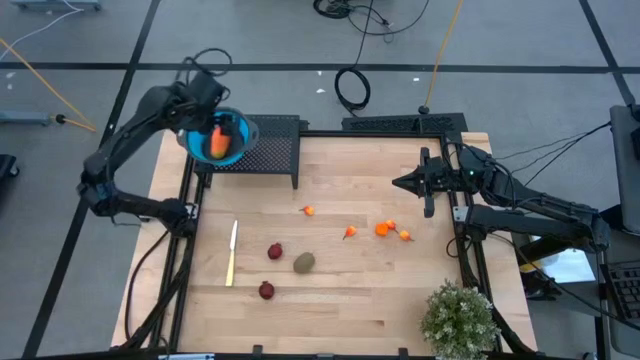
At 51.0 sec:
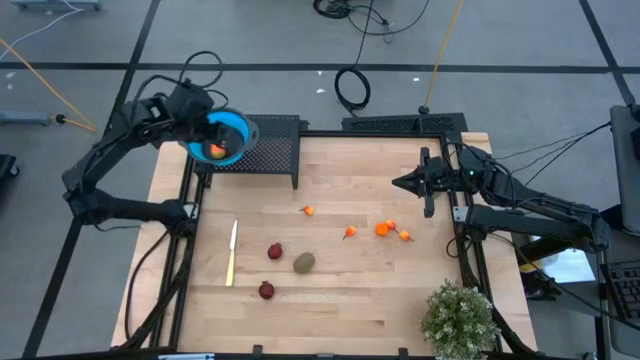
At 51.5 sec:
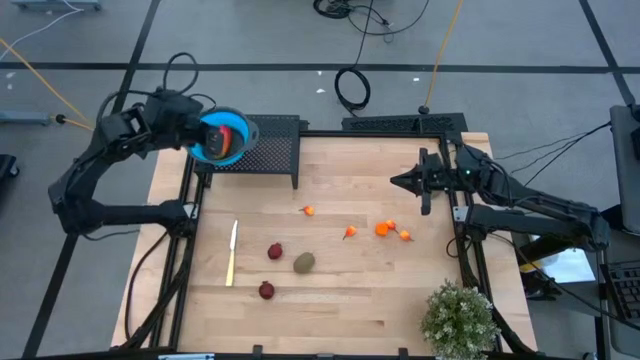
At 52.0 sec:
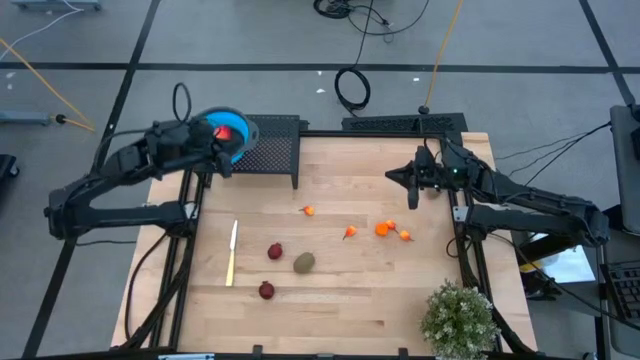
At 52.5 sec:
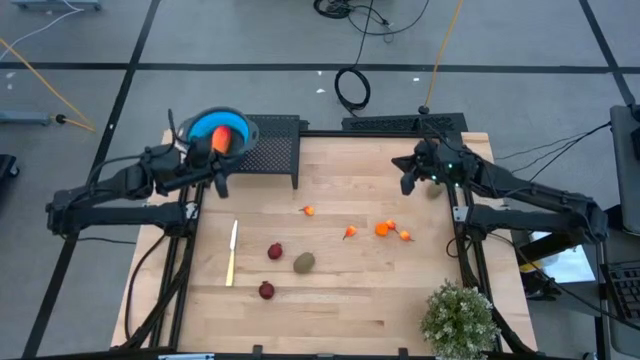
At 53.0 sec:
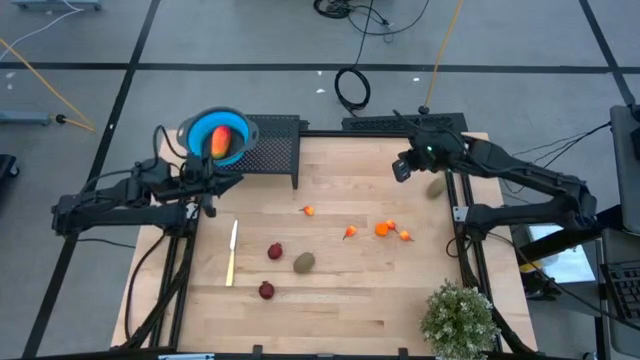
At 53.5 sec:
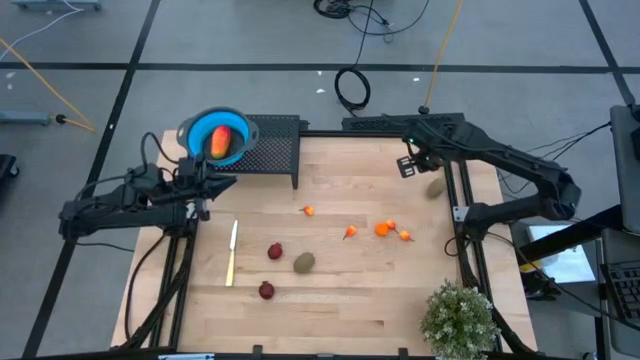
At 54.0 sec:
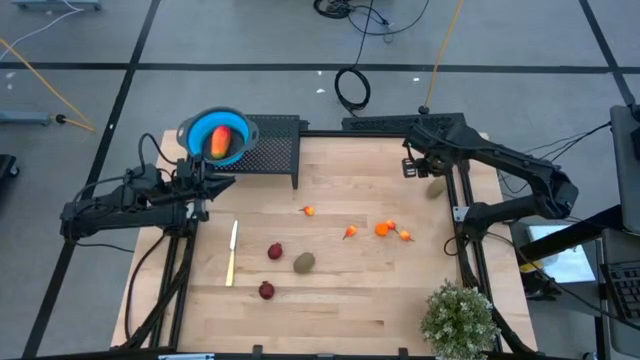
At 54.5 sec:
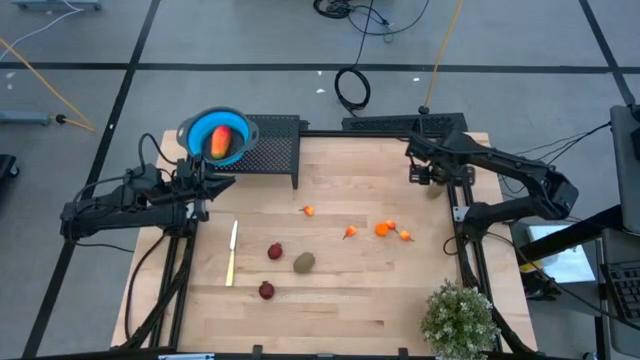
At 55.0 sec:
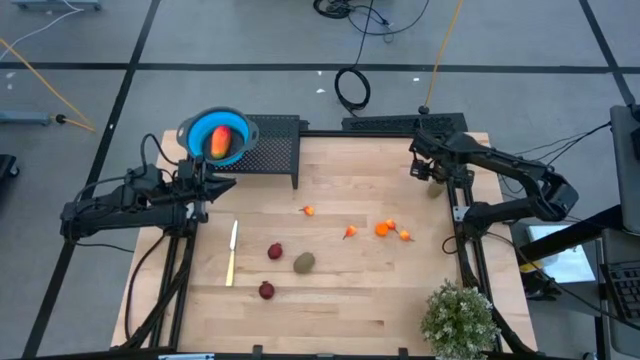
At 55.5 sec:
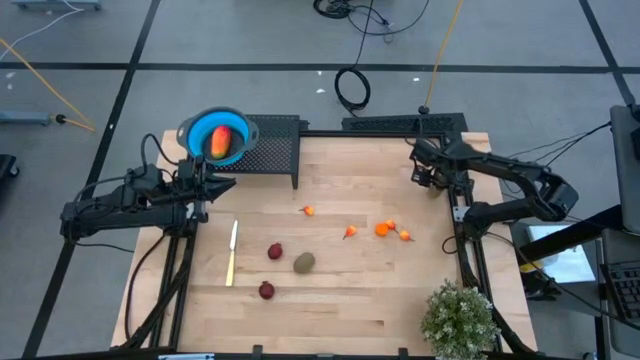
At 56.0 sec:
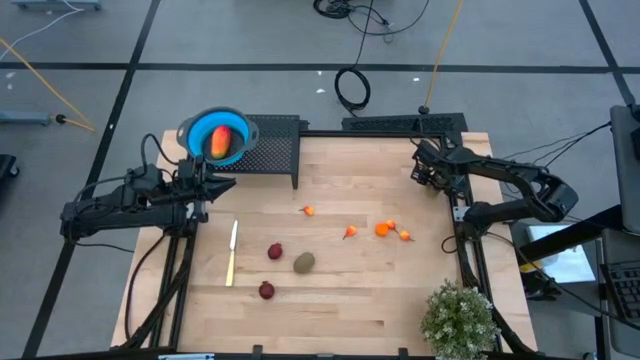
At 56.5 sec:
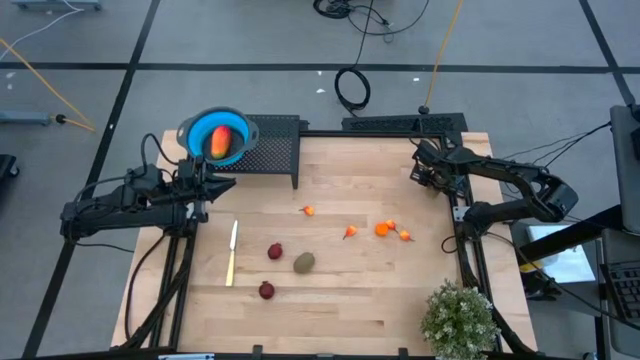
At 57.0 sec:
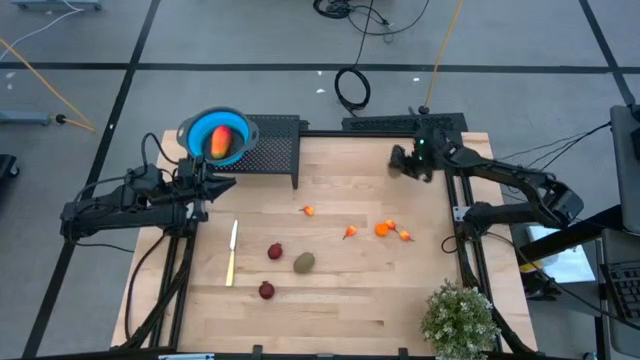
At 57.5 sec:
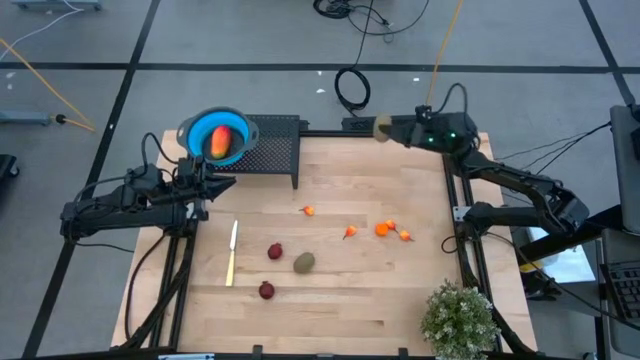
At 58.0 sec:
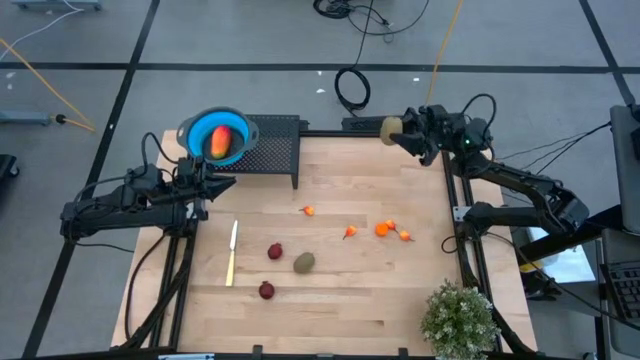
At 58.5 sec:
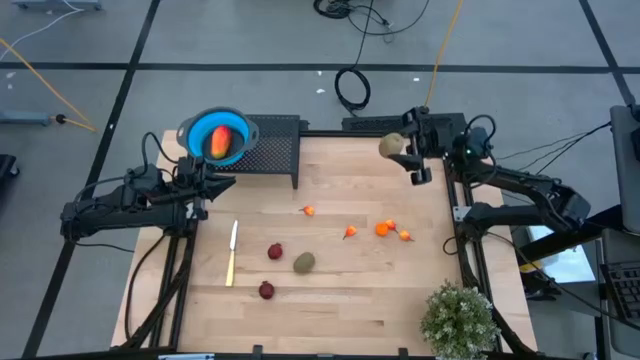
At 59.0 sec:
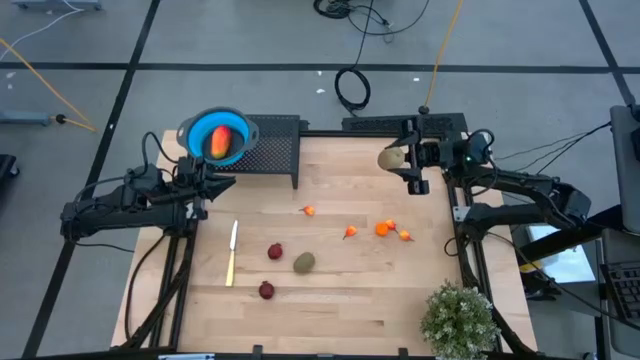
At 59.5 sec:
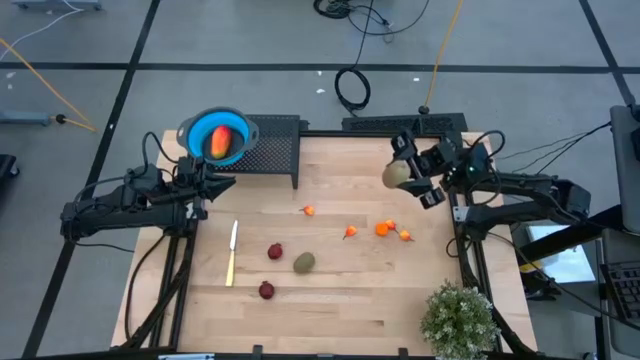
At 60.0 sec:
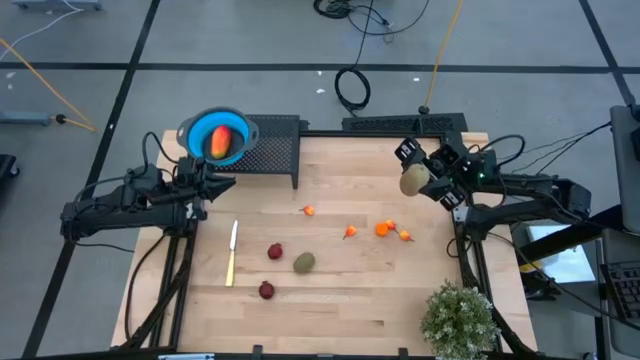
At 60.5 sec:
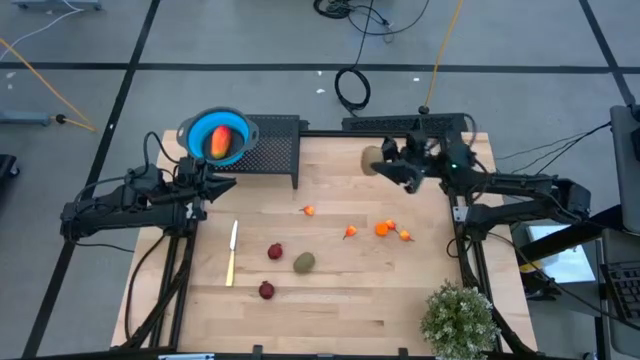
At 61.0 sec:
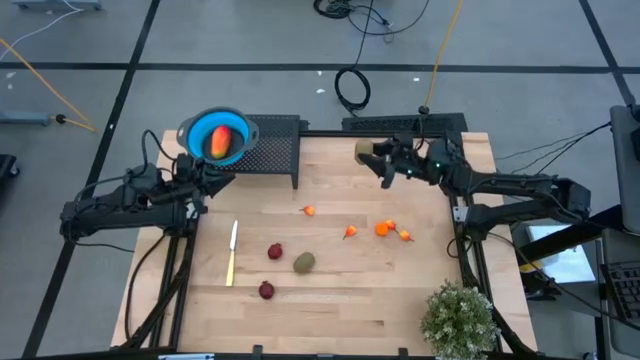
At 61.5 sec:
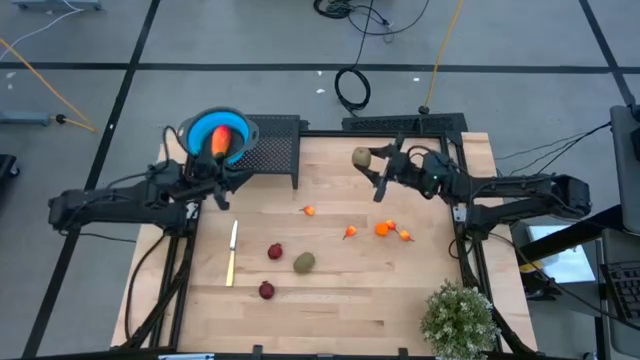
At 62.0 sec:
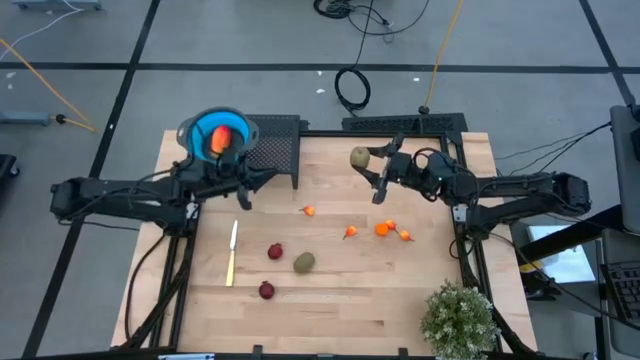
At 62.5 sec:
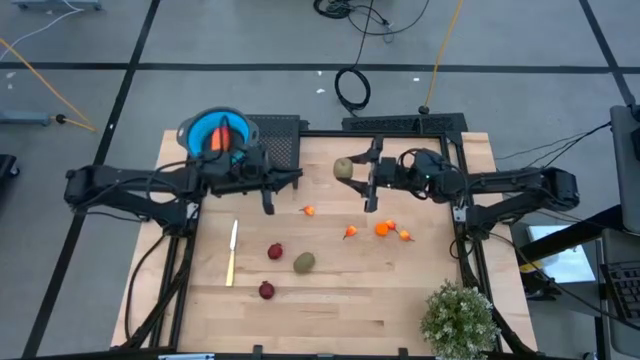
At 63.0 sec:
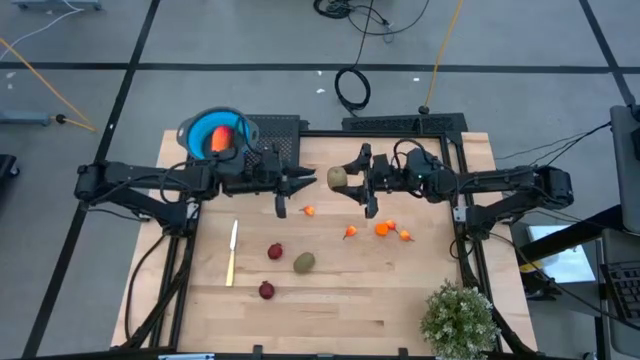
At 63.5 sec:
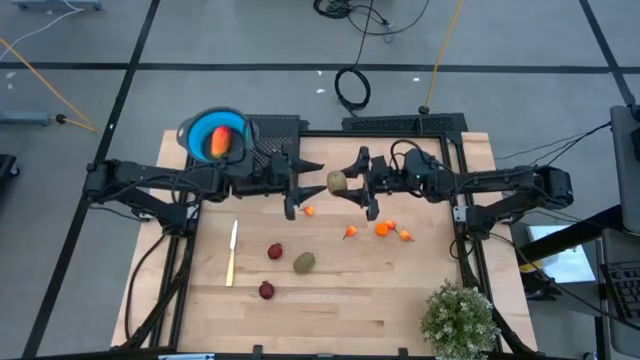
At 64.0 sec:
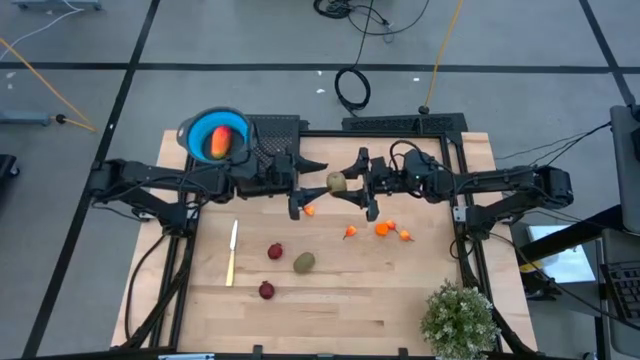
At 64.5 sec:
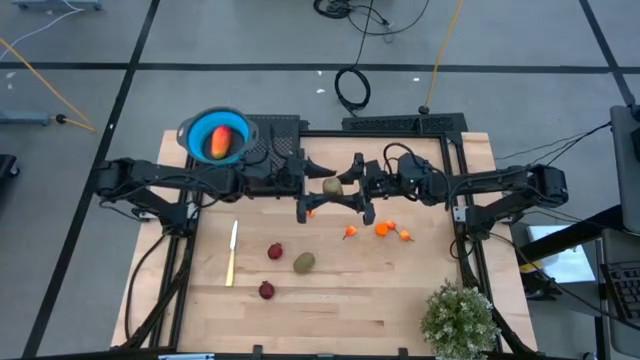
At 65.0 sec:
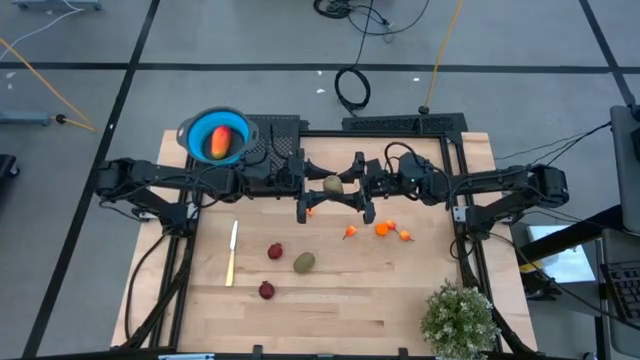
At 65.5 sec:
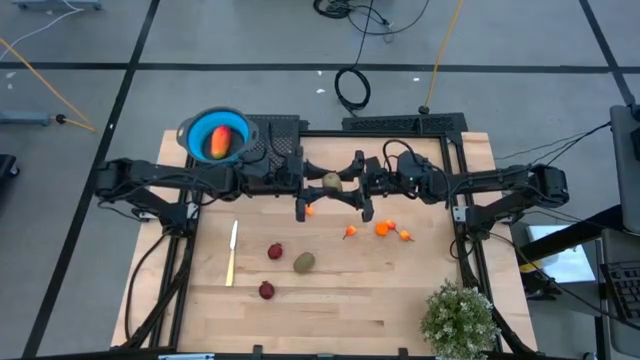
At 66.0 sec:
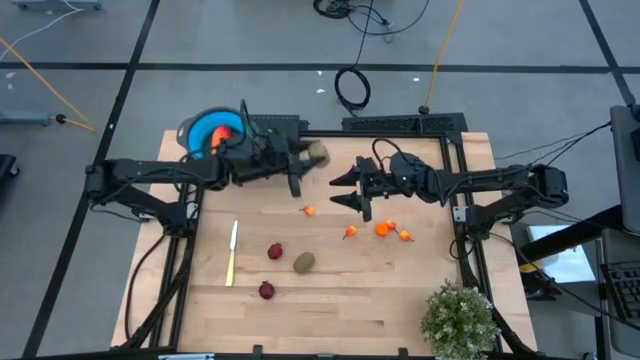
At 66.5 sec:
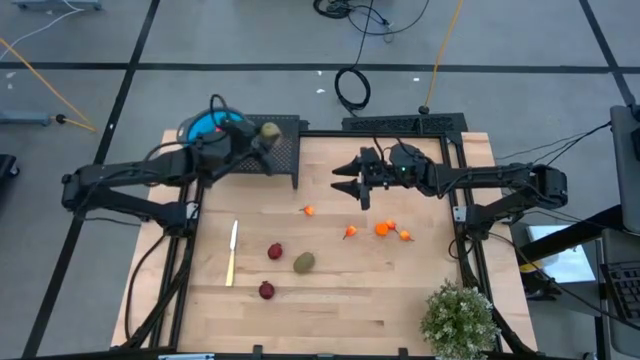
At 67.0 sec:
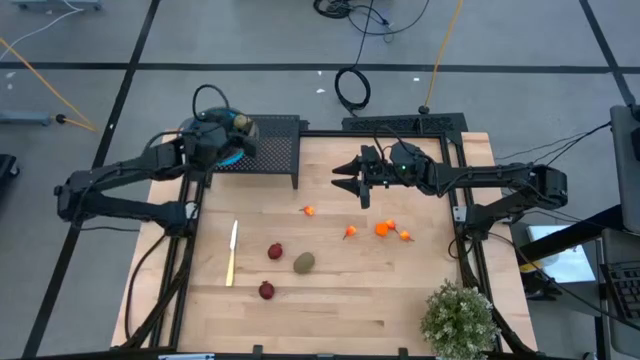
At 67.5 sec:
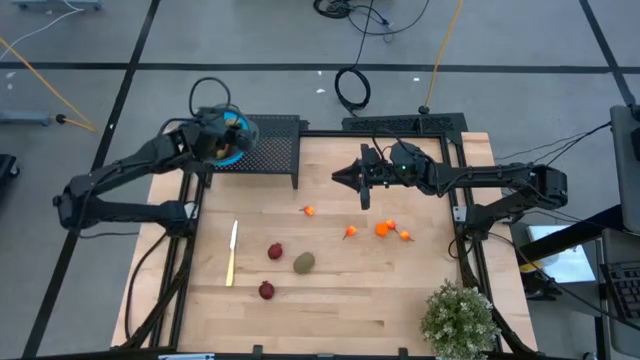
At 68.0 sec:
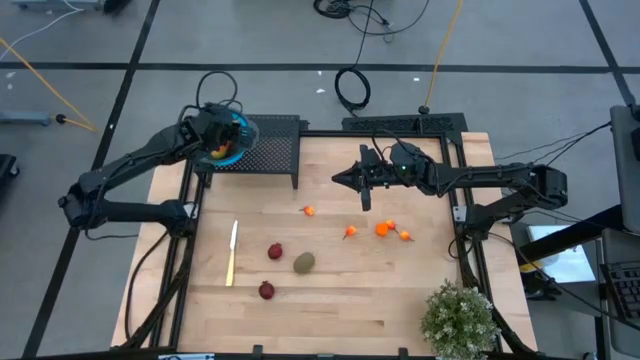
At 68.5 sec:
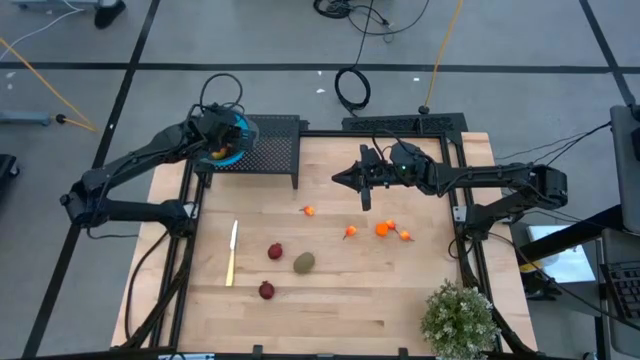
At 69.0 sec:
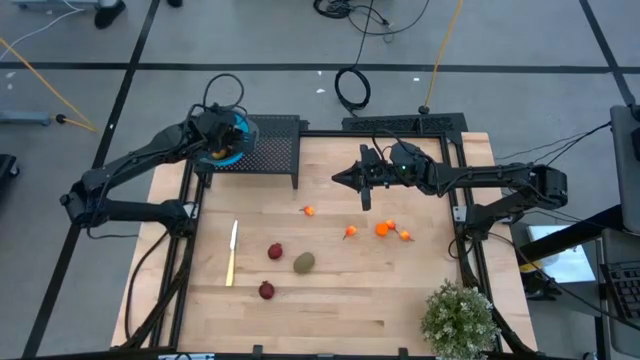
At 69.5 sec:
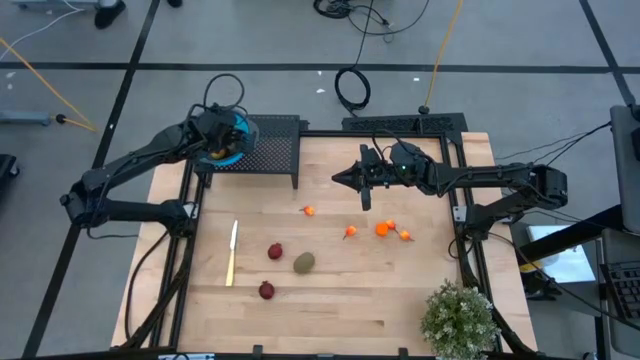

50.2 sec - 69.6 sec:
Task: Pick & Place Fruit
Put the kiwi into the blue strainer bowl on the shelf
